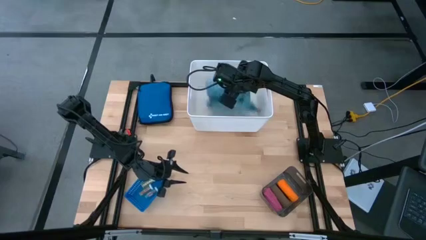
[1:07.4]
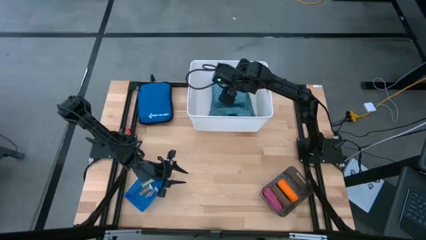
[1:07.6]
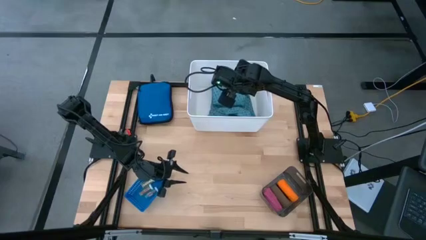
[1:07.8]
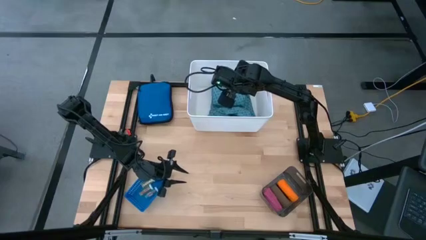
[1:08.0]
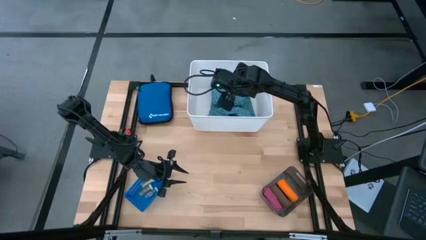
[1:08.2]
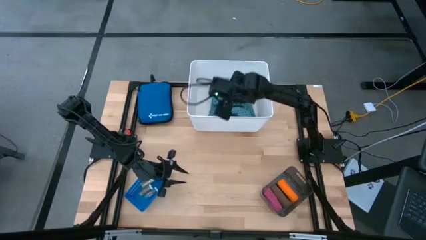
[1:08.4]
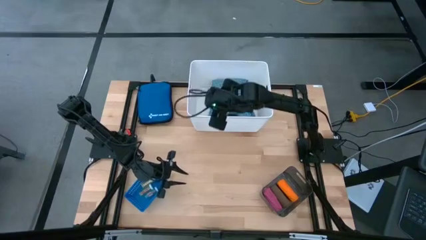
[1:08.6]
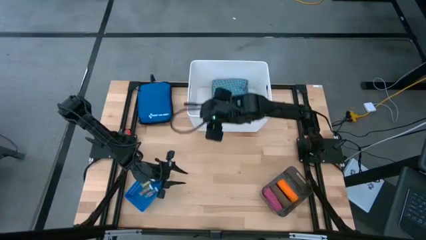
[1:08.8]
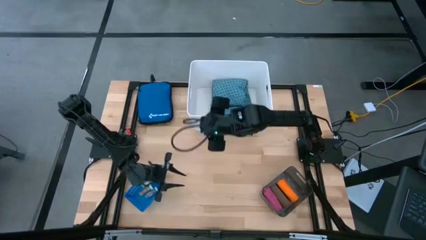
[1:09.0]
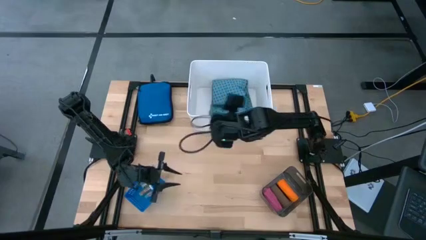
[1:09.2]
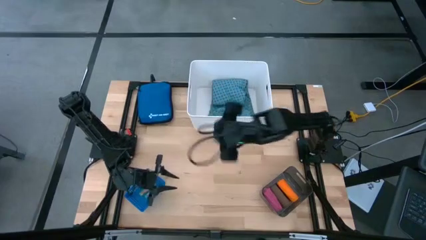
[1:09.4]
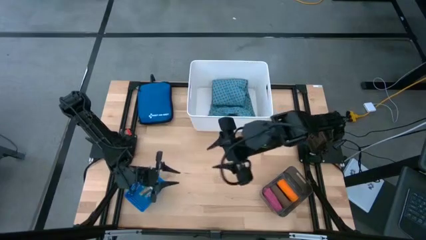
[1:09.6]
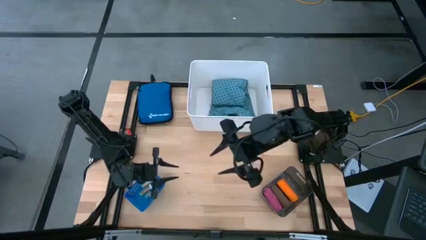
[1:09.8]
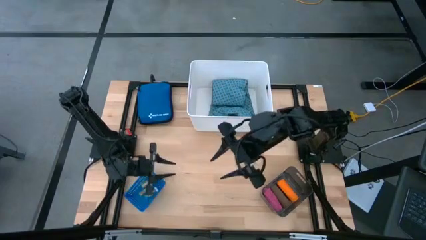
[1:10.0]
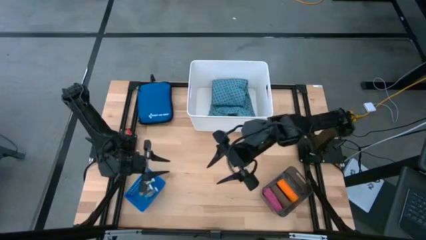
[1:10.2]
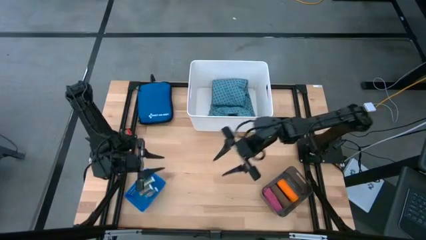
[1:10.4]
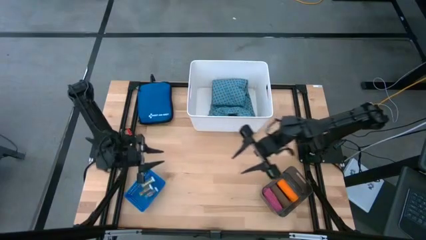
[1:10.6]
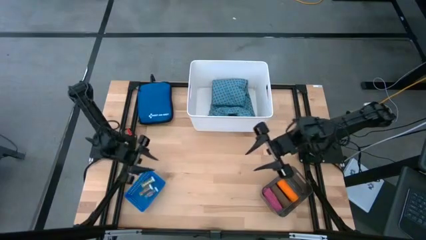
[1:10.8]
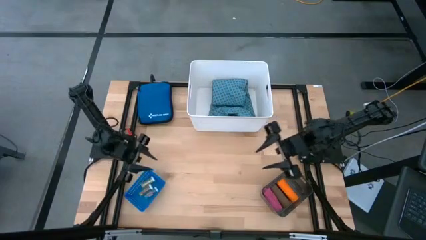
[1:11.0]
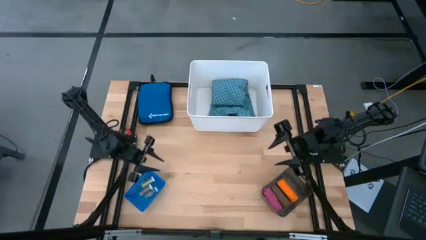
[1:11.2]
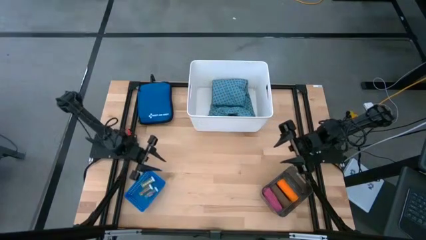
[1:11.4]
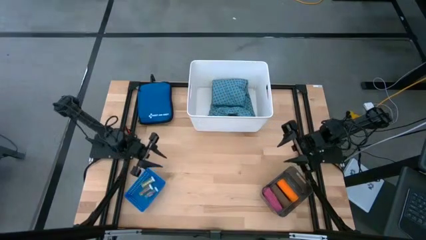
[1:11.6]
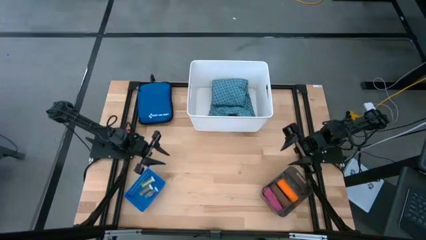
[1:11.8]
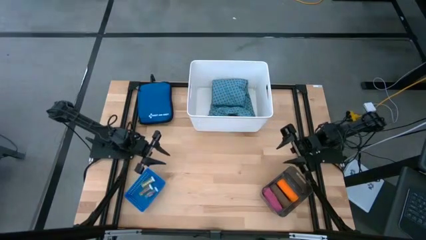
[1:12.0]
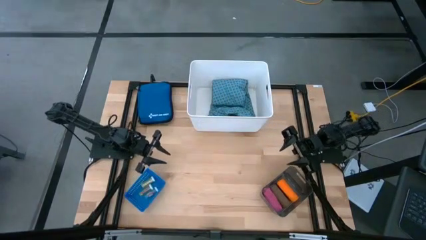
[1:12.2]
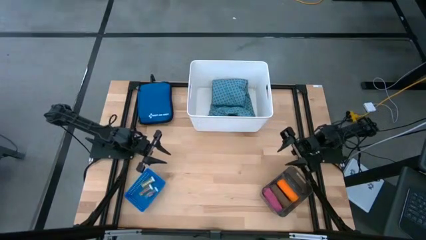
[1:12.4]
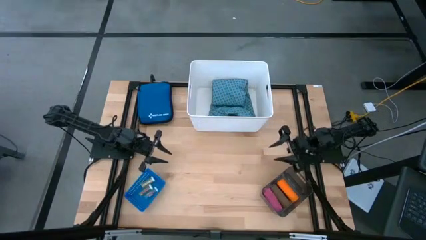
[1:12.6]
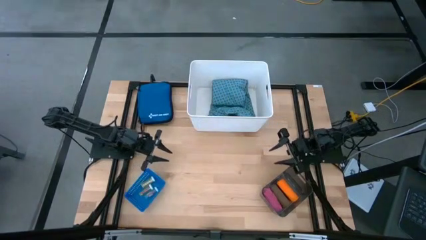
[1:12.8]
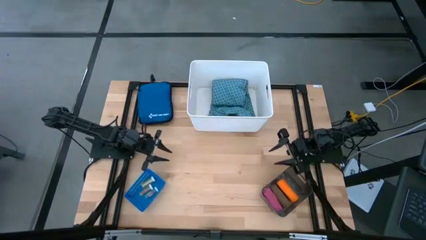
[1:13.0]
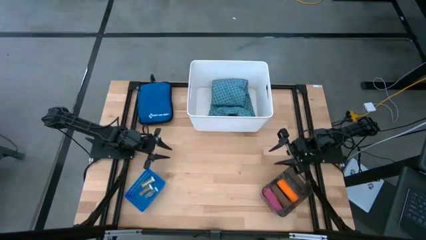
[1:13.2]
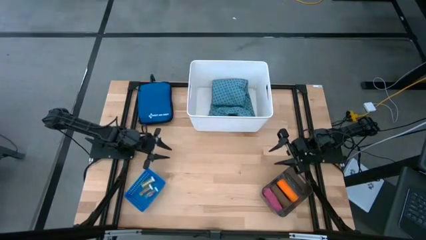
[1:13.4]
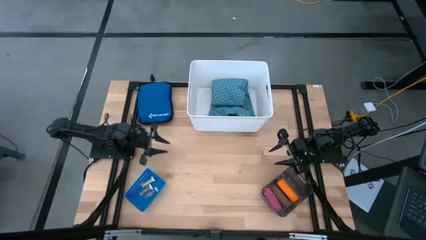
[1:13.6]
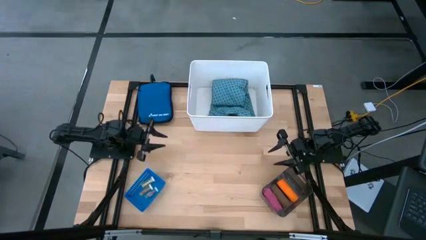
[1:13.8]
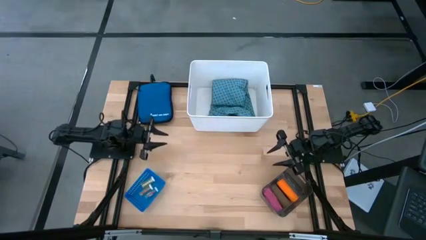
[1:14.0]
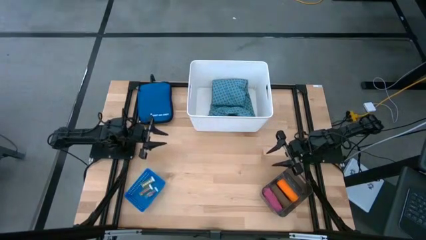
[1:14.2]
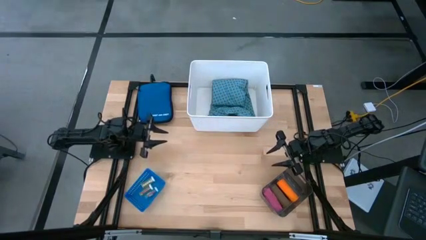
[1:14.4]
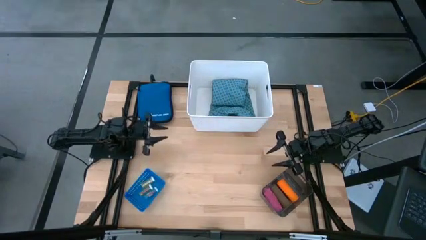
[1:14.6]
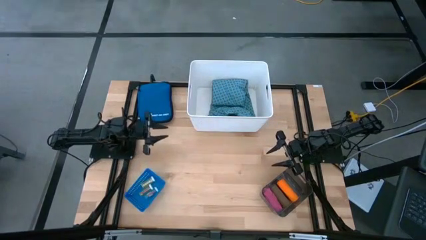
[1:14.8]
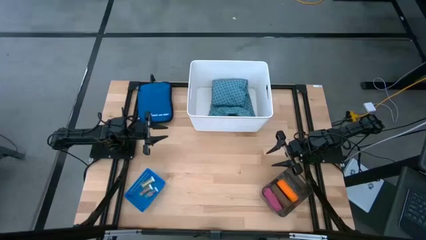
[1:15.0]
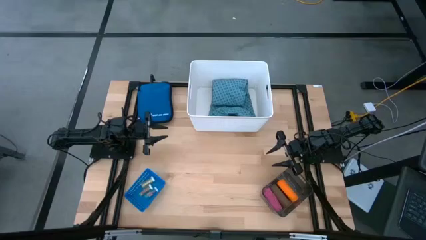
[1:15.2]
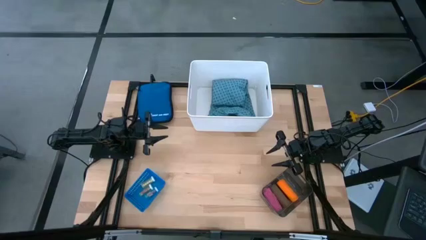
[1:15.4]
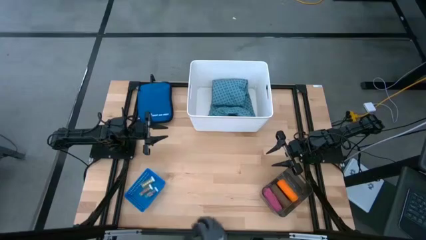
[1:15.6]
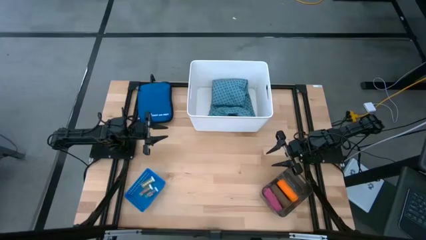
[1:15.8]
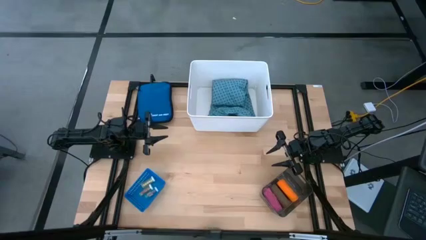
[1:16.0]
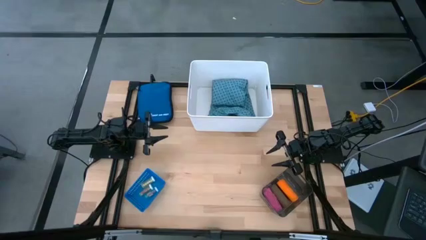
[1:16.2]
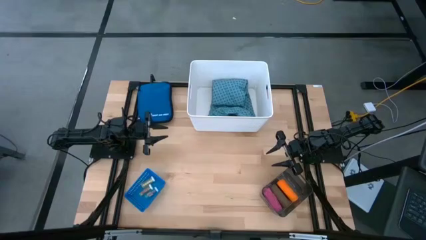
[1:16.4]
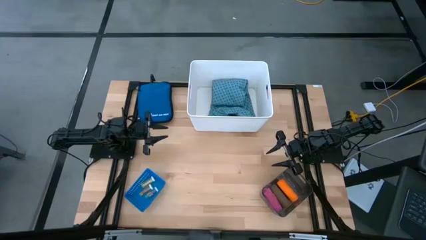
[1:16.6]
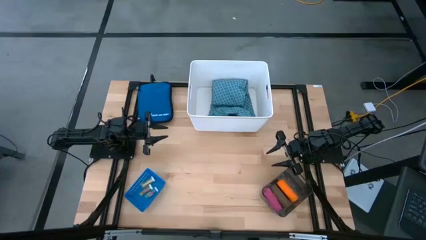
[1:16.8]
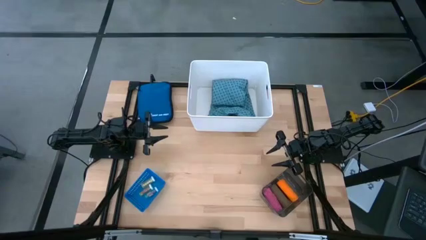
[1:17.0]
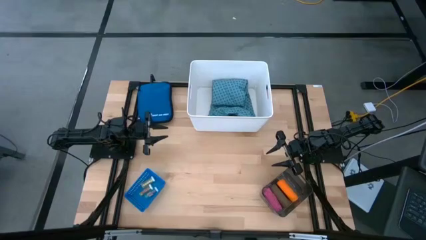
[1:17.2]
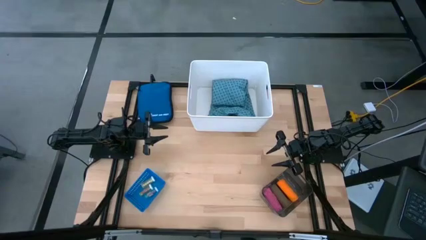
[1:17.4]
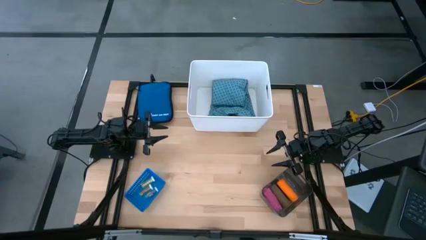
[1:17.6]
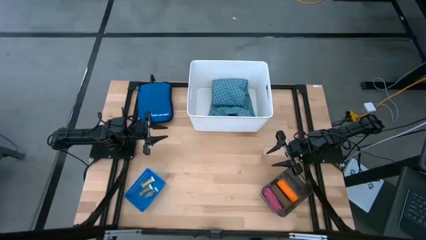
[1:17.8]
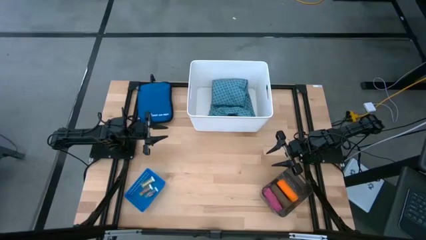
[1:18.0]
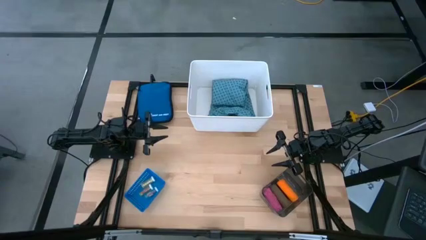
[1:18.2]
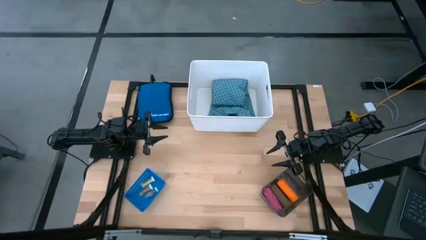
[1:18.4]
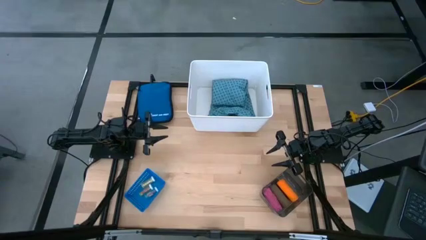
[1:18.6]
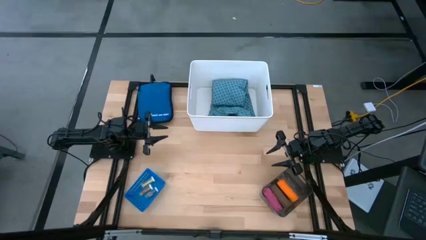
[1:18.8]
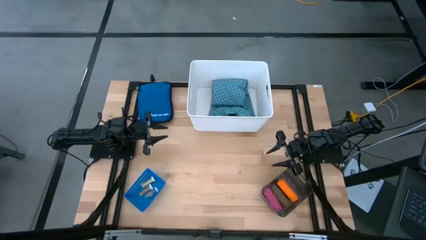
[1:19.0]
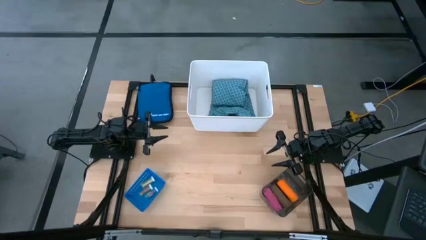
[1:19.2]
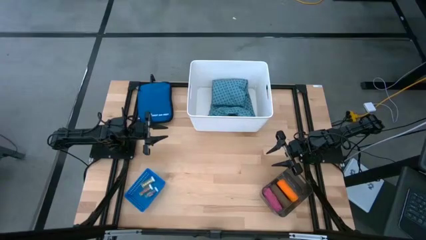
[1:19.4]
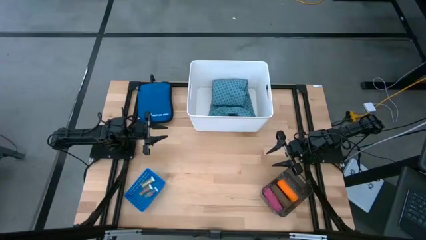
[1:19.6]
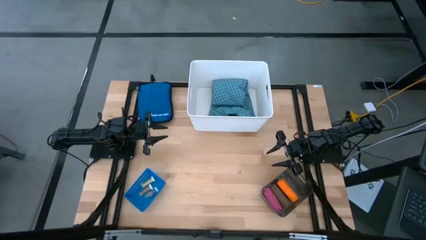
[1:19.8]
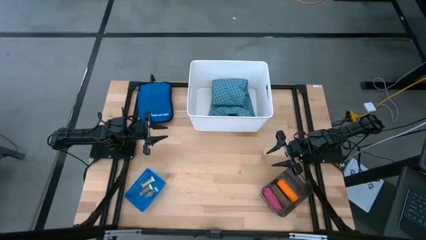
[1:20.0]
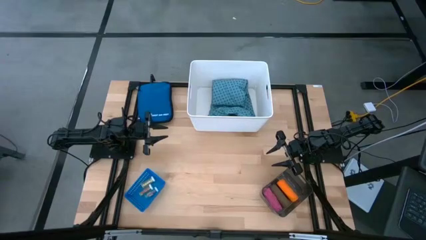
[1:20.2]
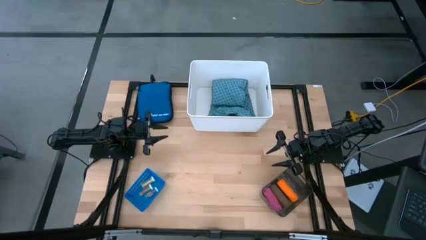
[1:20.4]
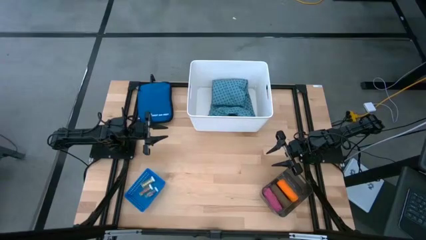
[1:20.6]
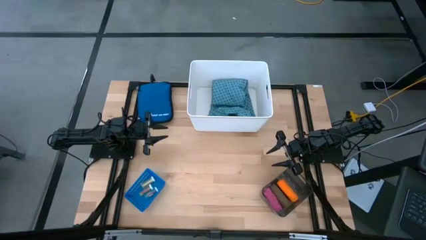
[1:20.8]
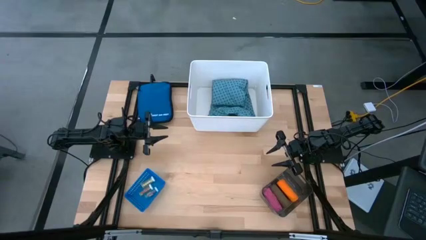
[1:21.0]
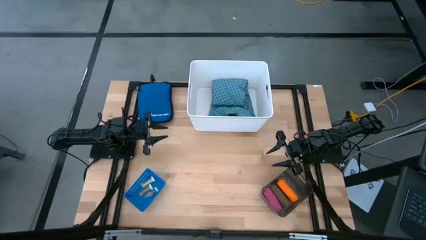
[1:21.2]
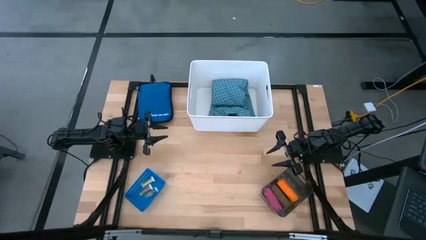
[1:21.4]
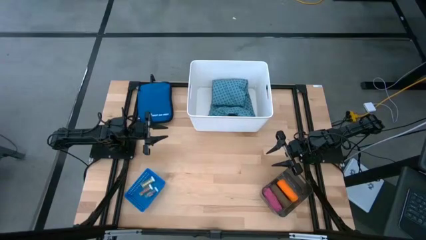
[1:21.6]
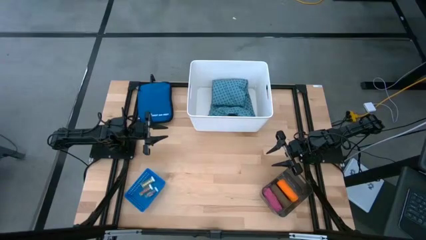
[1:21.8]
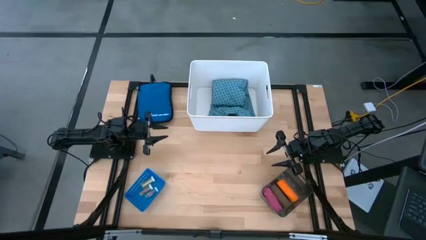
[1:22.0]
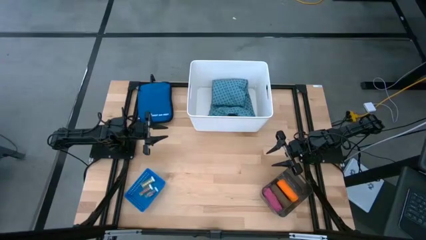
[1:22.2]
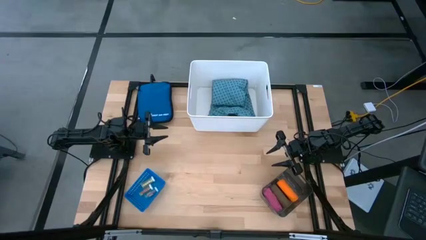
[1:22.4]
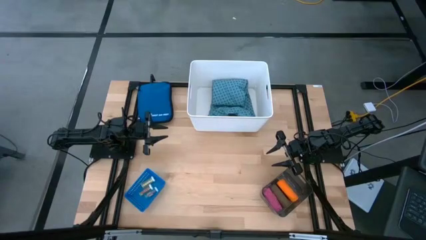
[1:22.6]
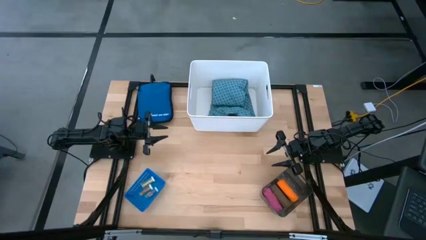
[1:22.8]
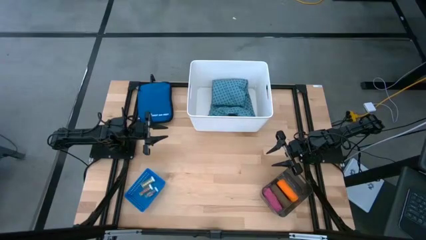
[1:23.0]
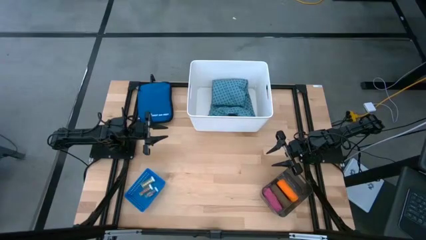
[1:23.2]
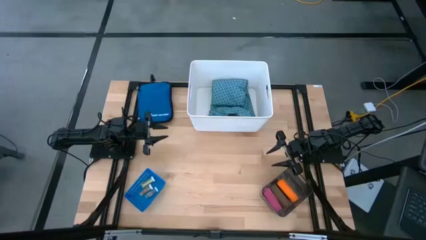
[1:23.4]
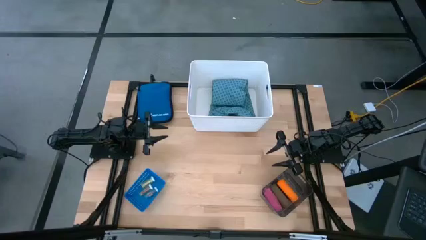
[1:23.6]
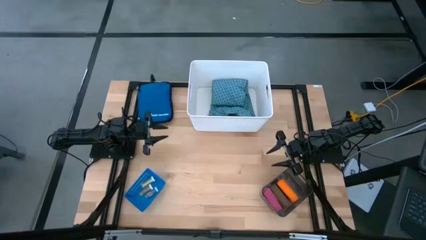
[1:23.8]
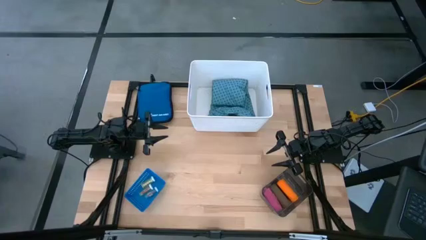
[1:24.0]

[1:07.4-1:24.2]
Task: Pick & Place Medicine items
Return to Home Position
